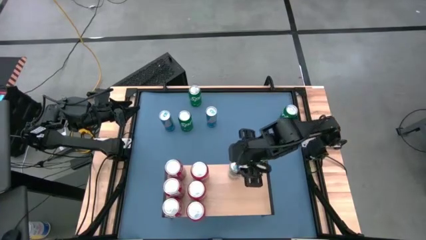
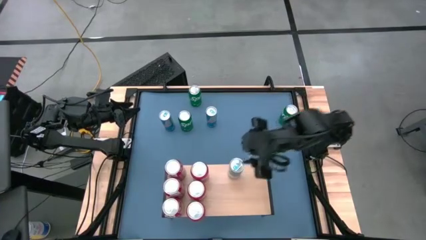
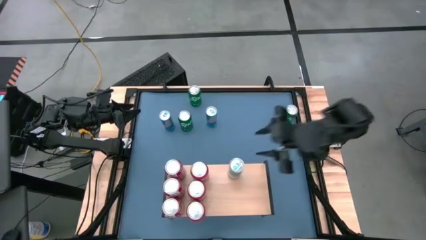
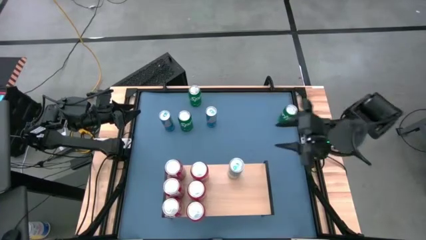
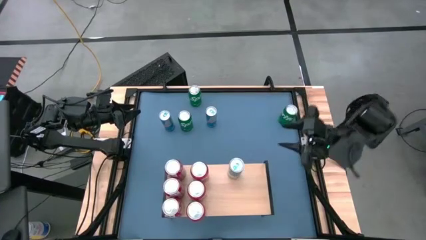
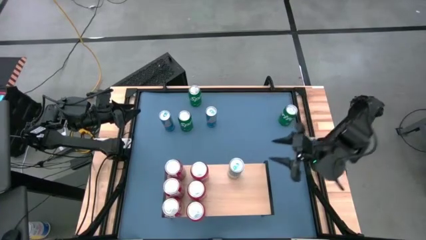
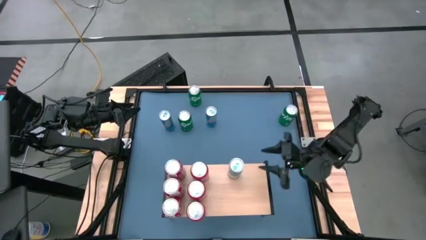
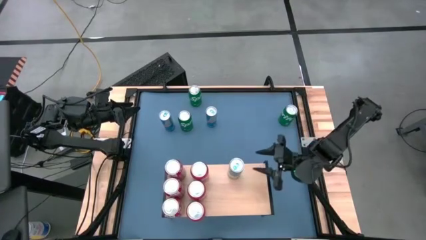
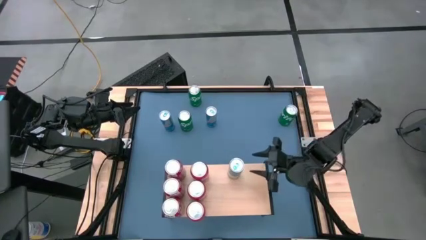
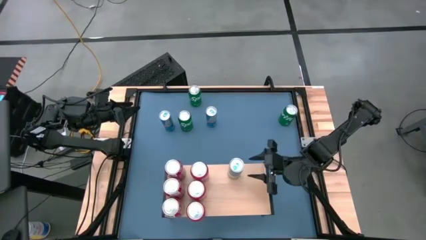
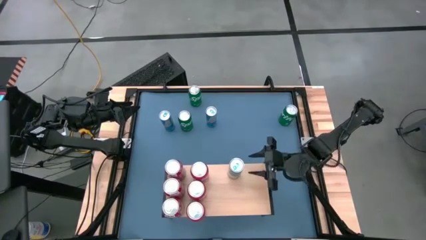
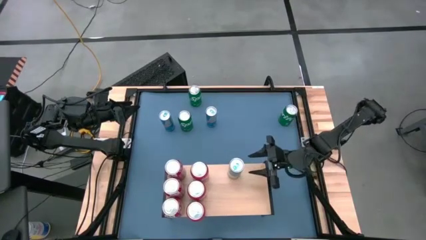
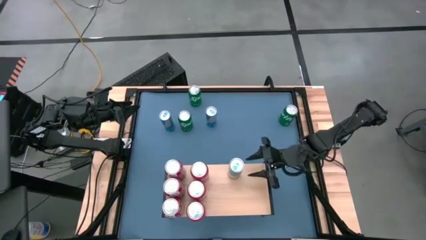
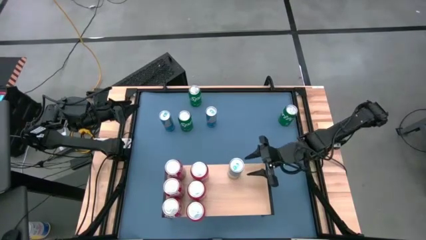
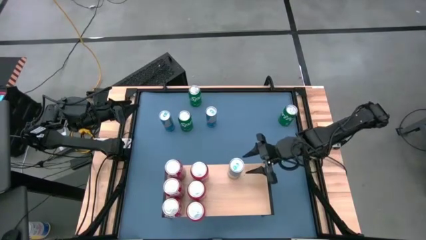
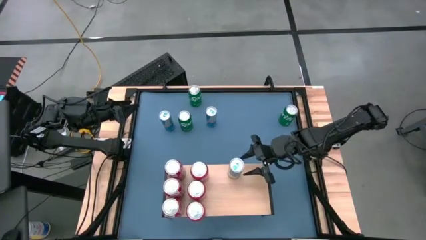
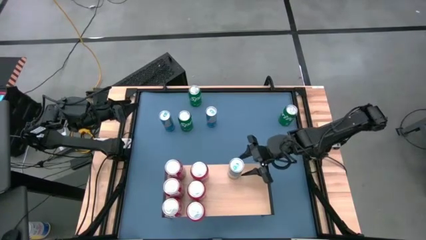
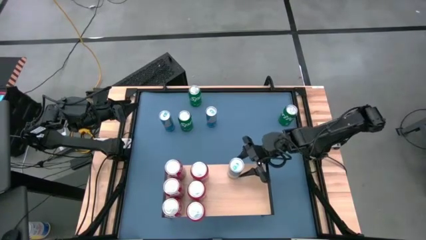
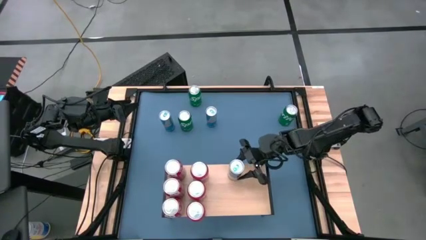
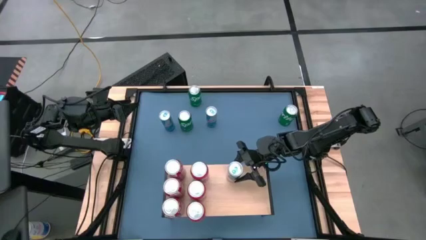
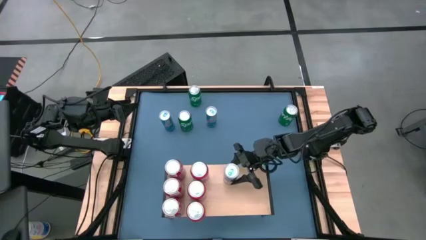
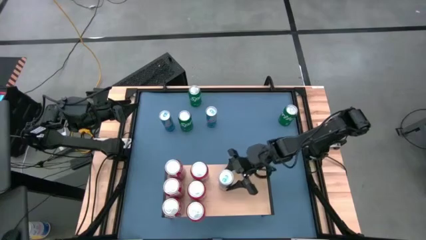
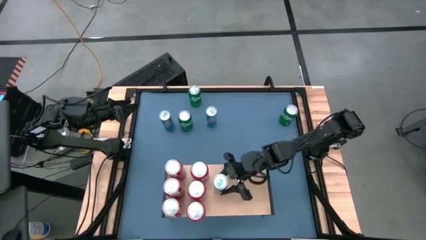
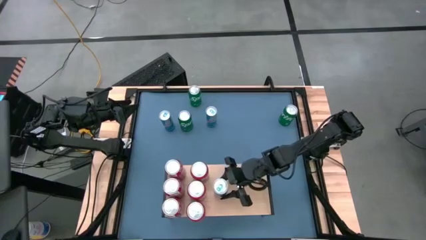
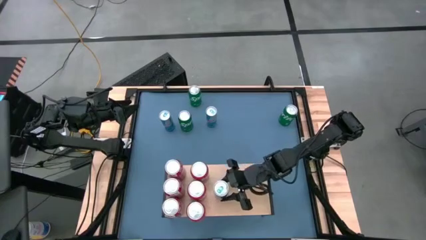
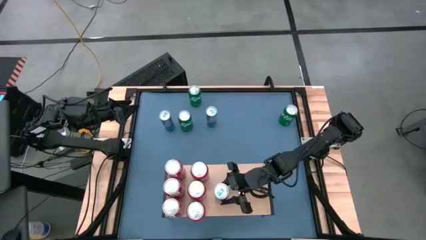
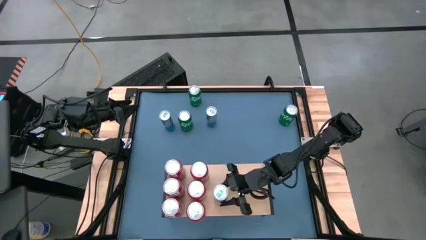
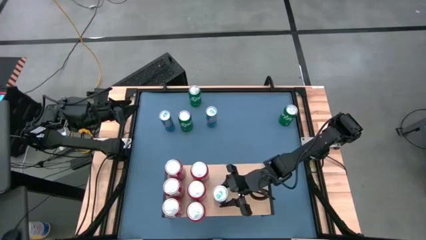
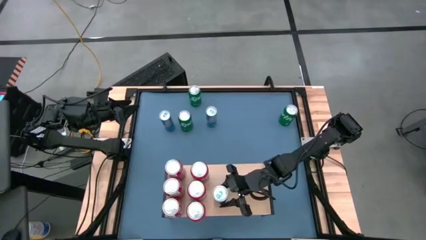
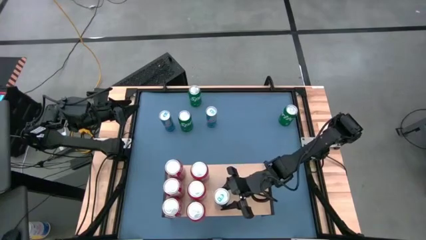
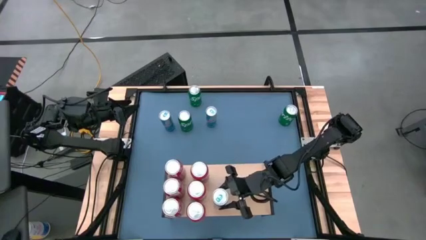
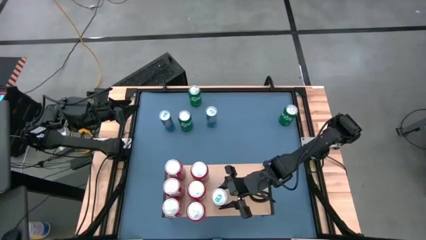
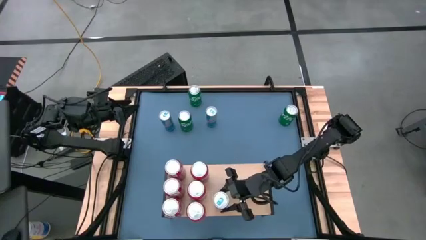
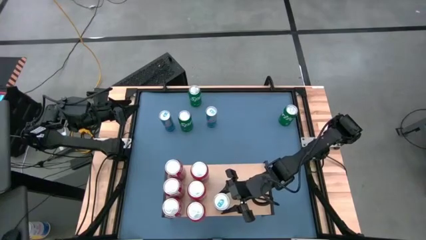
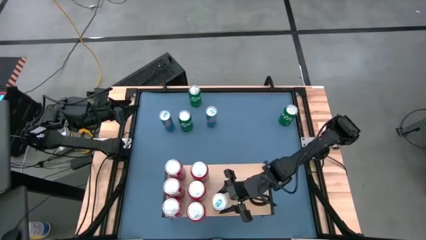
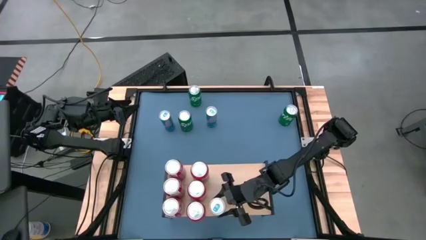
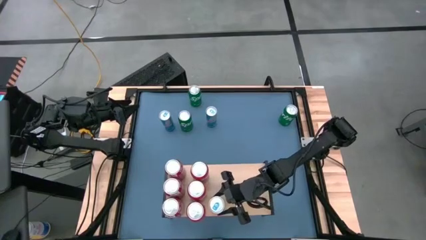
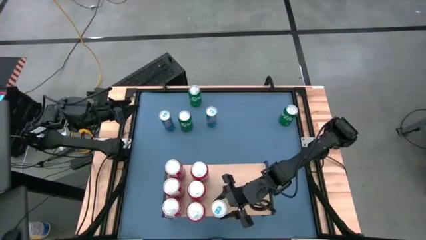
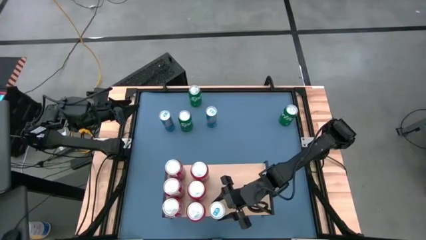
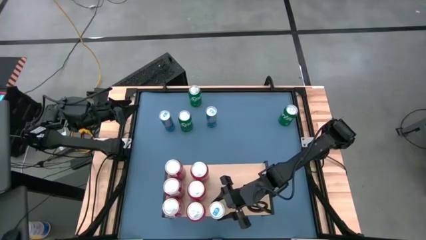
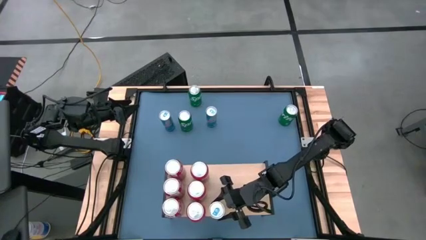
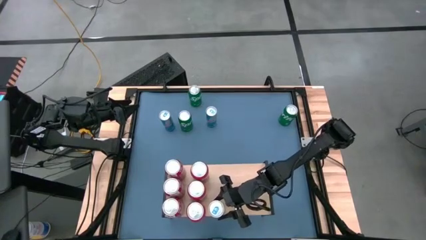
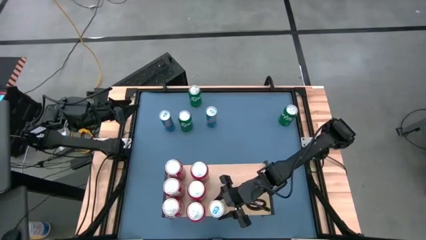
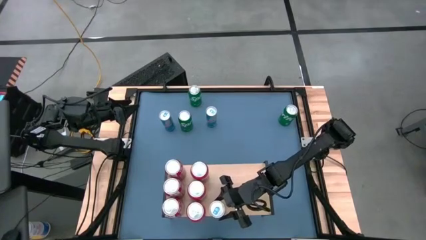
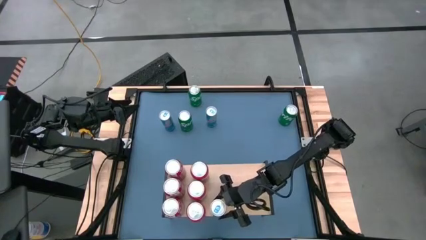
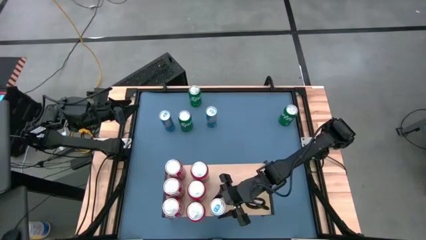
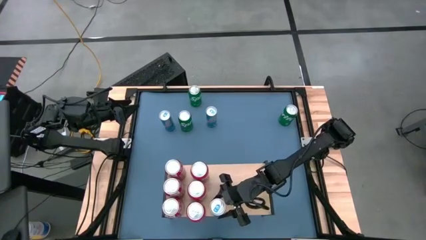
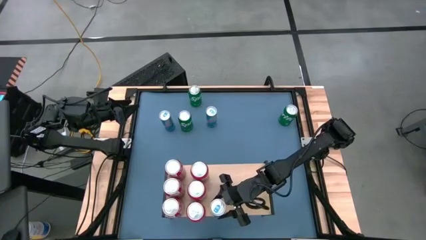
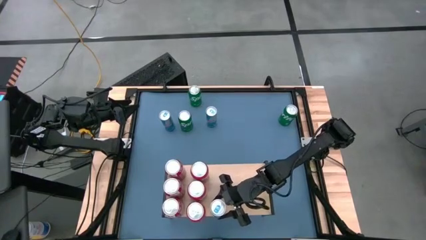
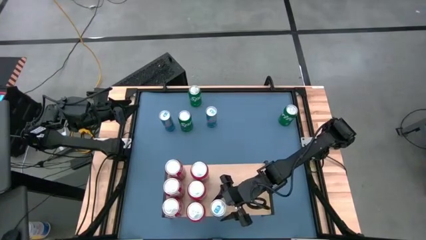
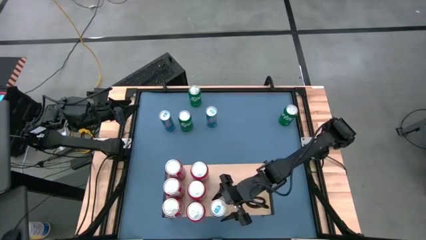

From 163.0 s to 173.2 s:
Task: Place canned beverage on shelf
Put the right blue soda can on the shelf
